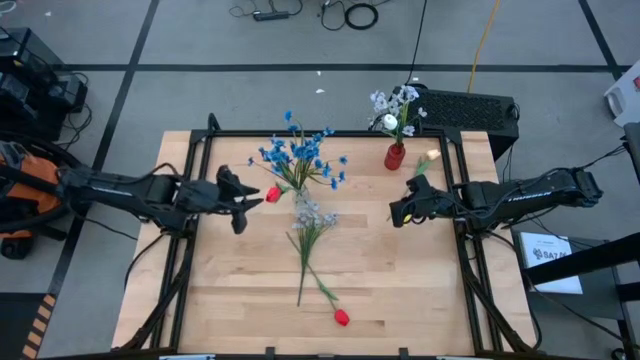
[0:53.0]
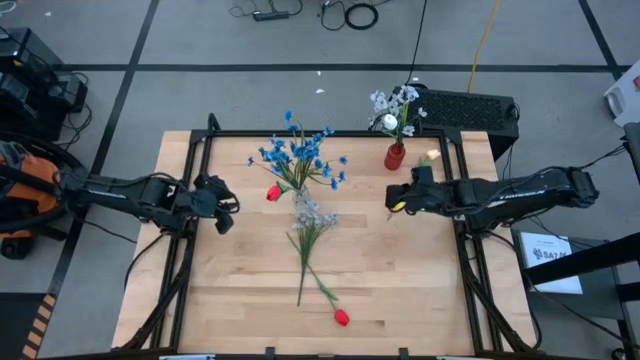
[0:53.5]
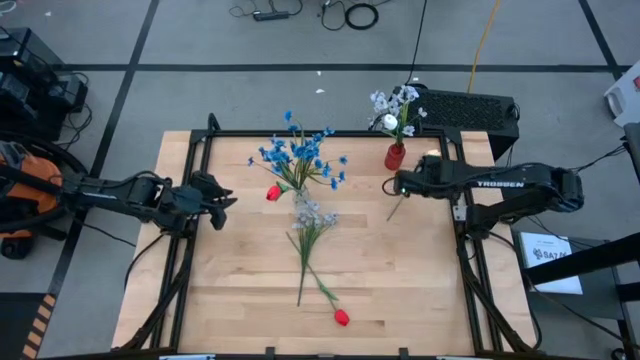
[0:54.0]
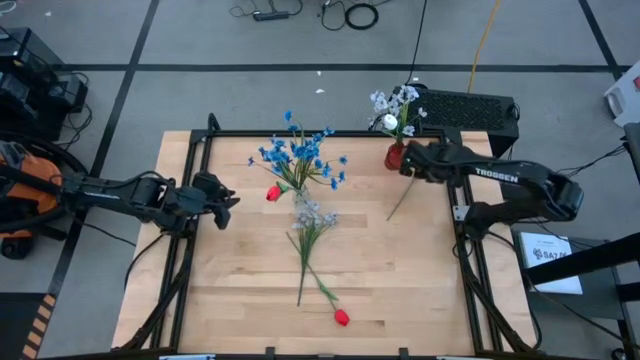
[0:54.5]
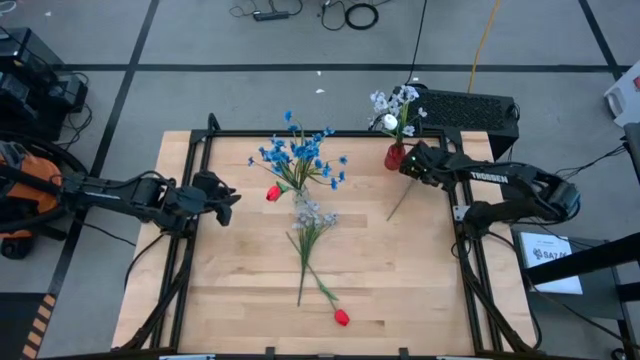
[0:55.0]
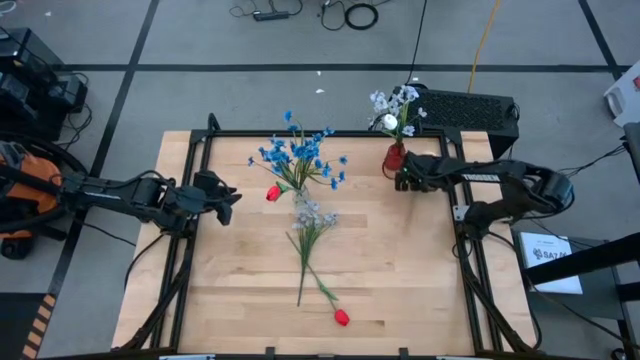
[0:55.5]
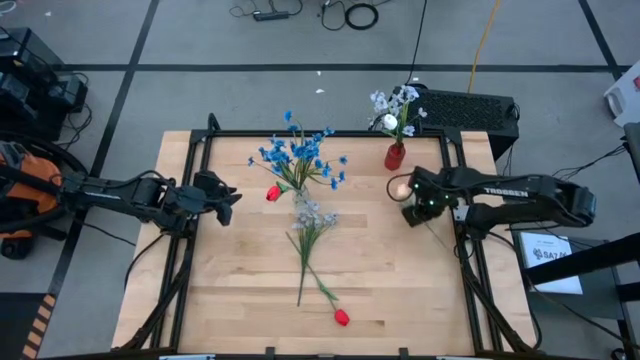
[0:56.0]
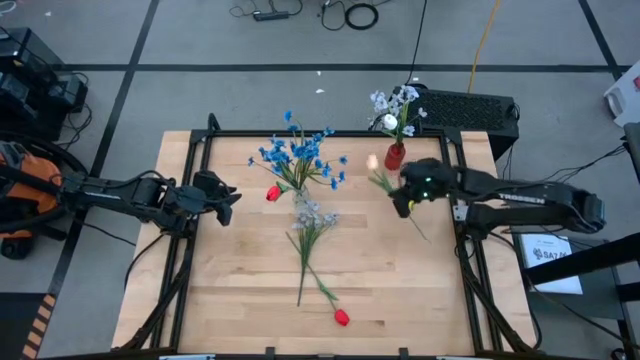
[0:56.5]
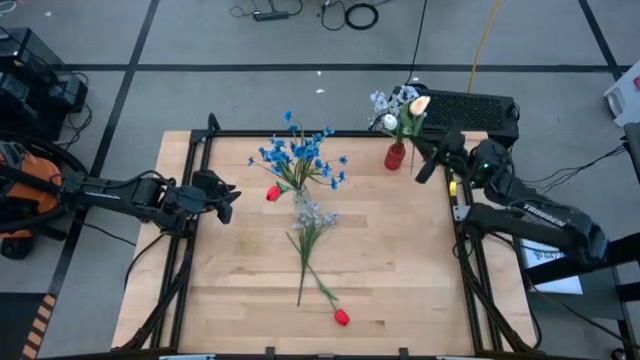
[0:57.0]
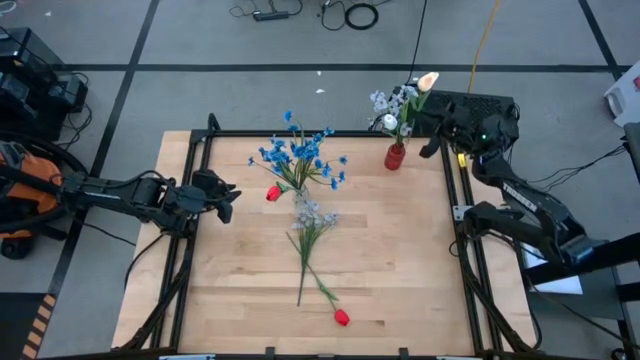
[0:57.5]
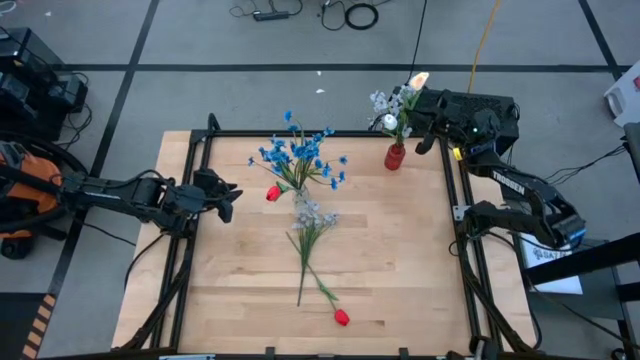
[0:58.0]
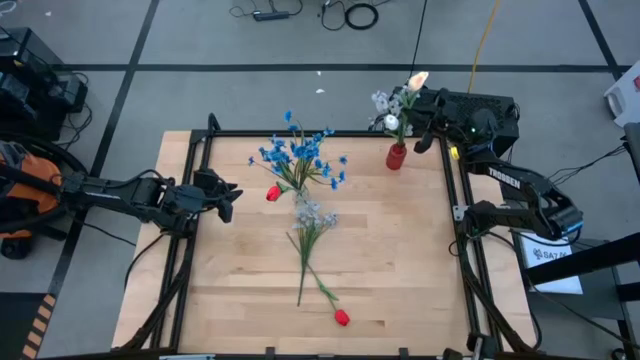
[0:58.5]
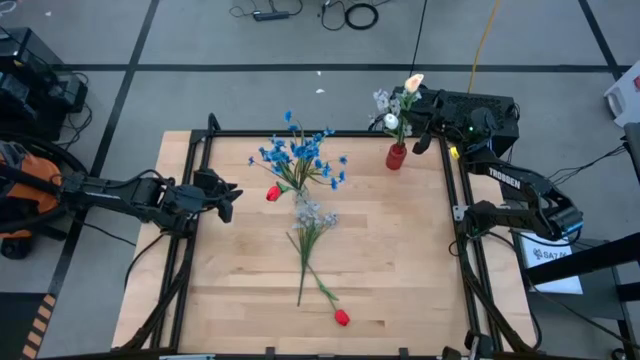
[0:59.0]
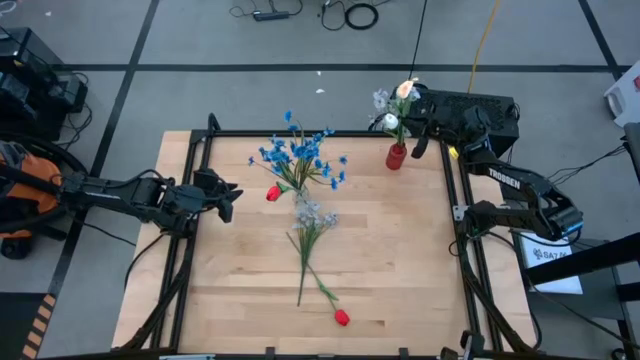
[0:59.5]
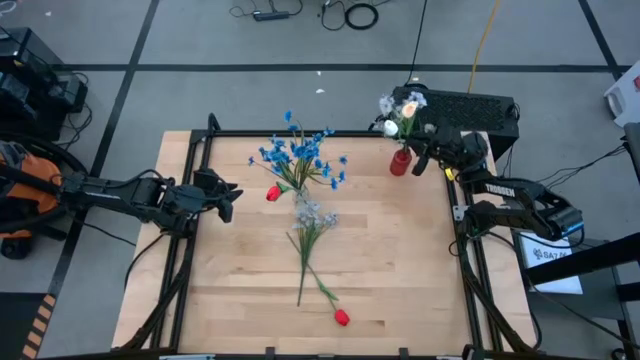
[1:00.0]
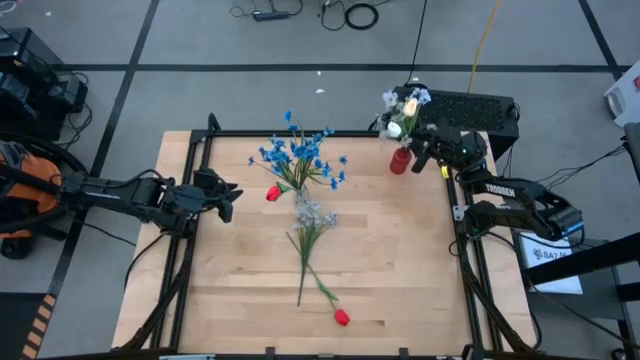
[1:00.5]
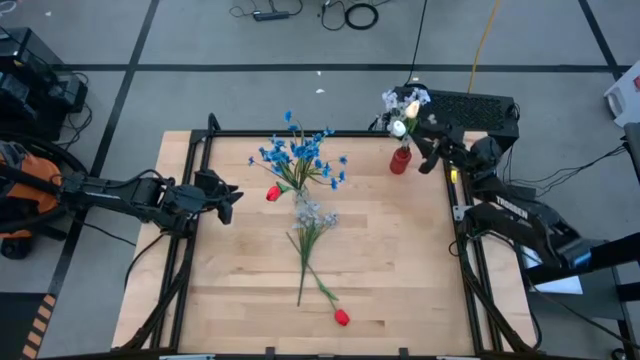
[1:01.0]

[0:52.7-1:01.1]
Task: Sort flowers into vase by color
Put the light yellow flower into the red vase

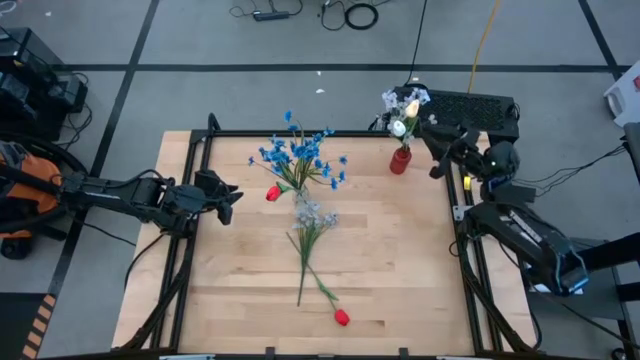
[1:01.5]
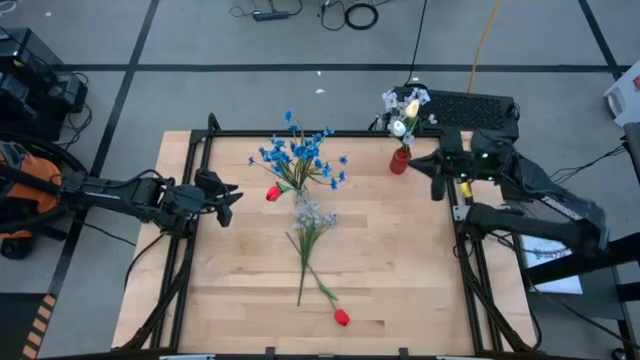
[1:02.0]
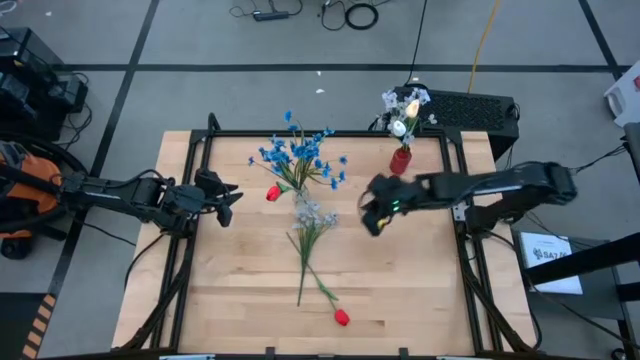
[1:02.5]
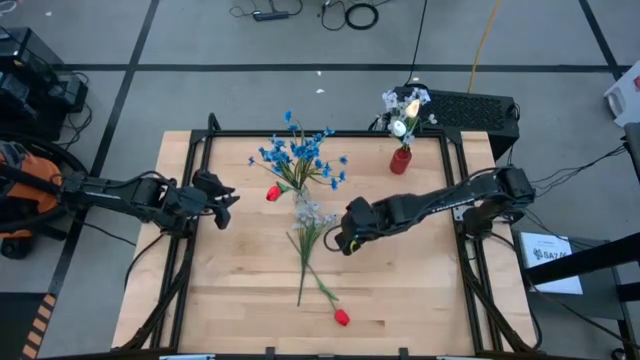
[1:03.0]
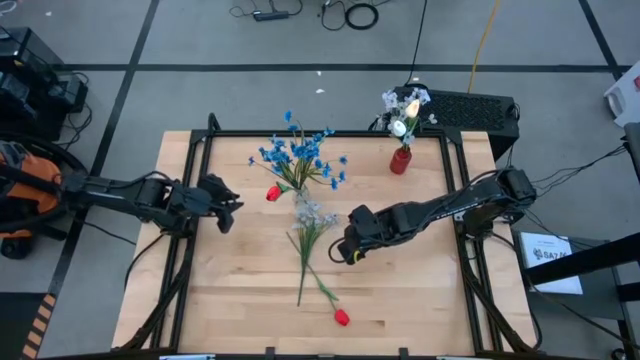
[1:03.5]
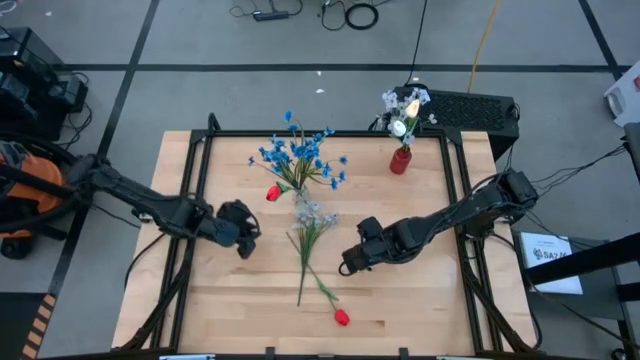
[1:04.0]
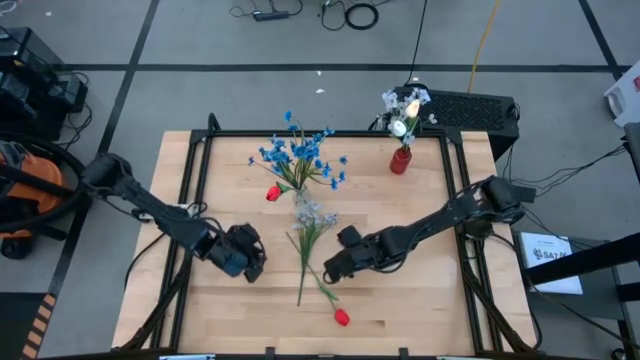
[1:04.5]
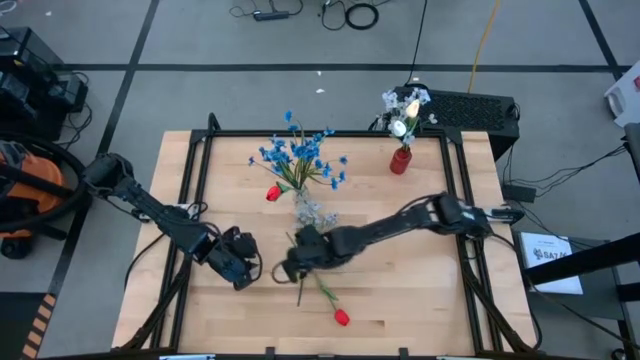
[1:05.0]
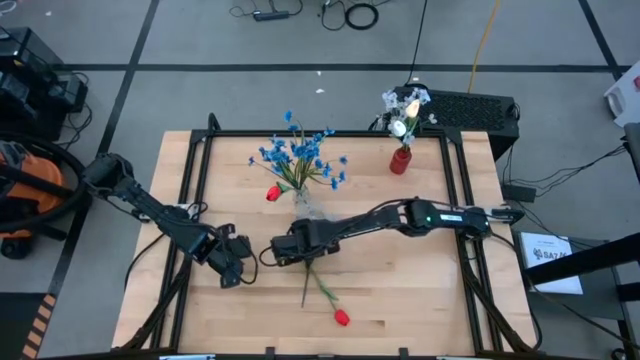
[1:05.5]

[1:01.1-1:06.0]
Put the white flowers into the red vase

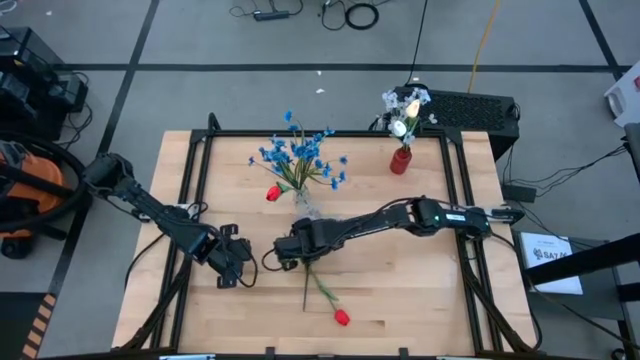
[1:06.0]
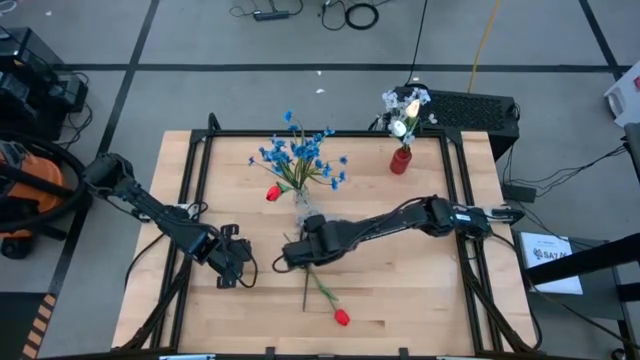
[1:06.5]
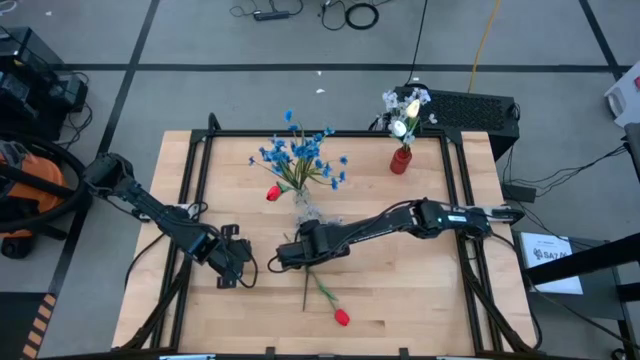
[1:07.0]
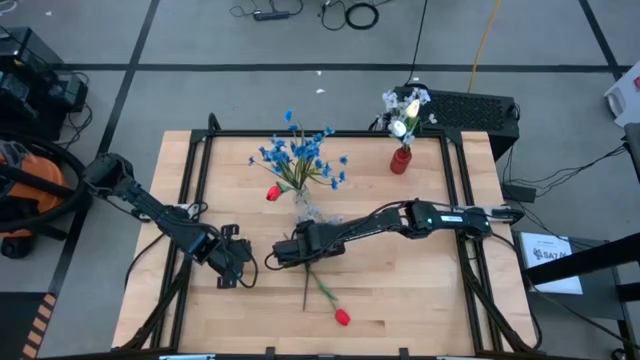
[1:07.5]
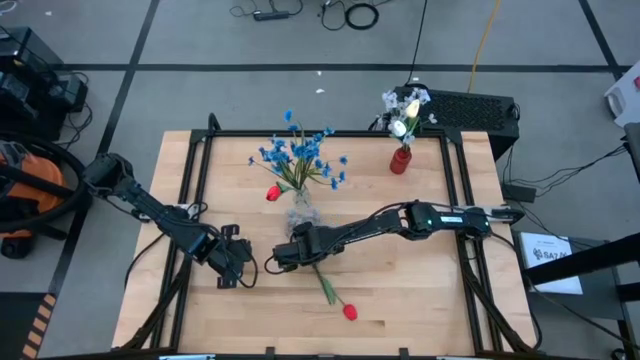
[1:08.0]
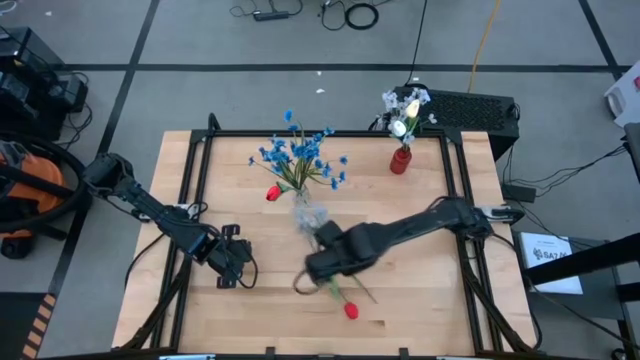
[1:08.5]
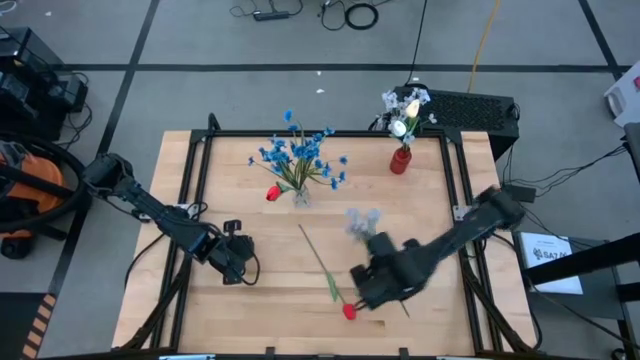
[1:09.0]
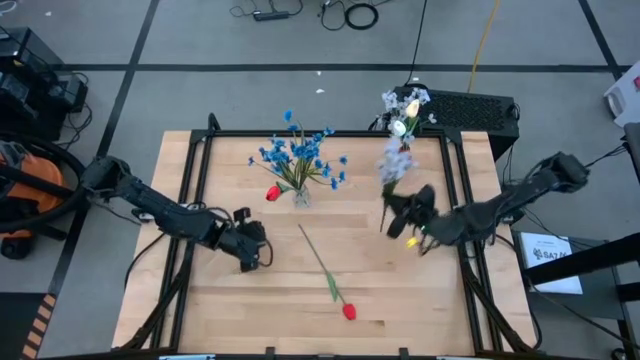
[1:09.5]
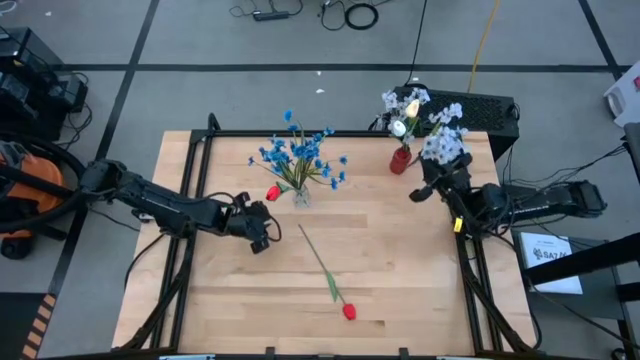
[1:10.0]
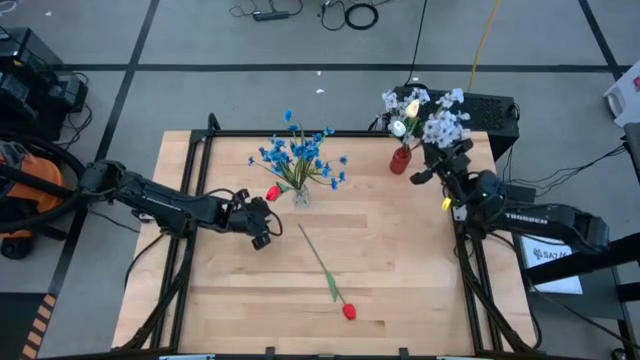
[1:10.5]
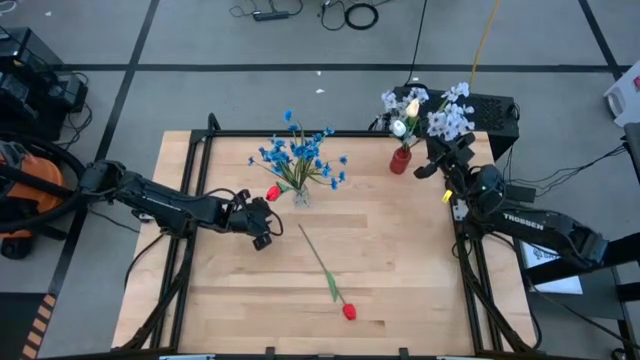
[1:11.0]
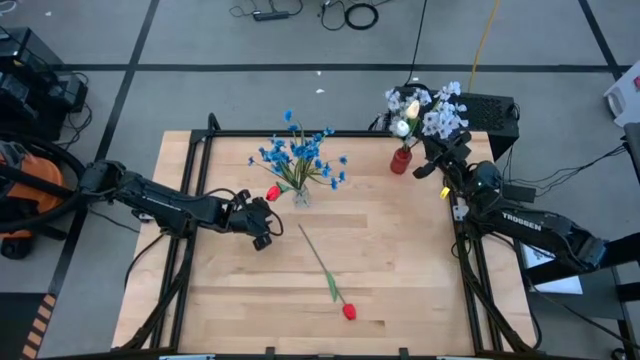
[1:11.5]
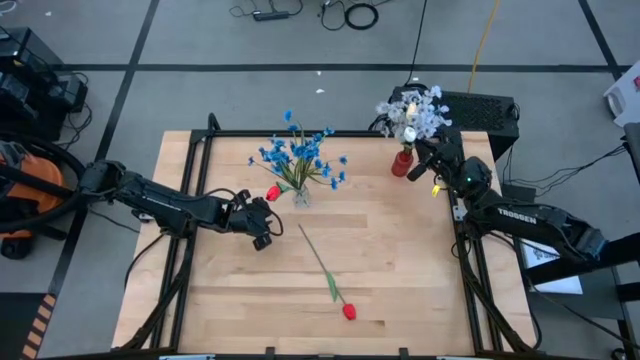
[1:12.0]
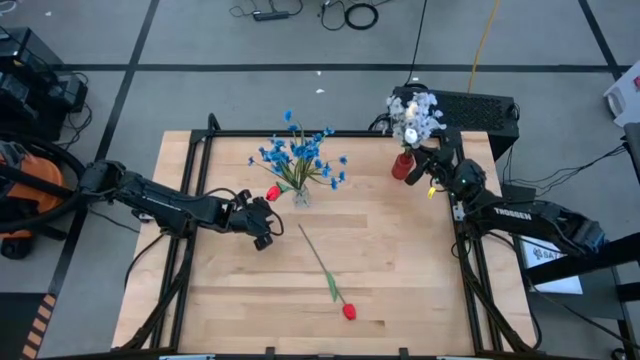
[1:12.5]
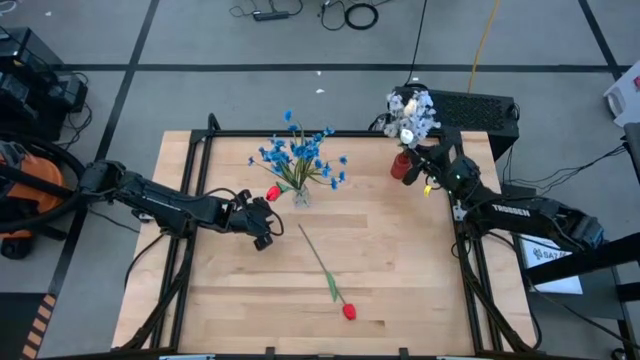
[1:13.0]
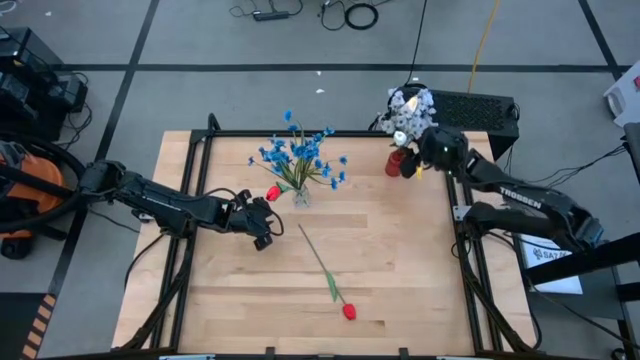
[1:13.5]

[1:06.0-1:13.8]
Put the white flowers into the red vase

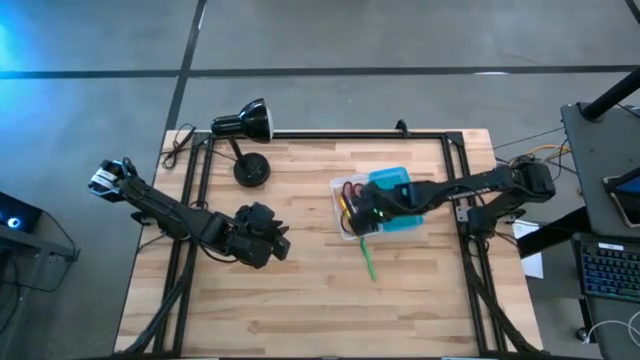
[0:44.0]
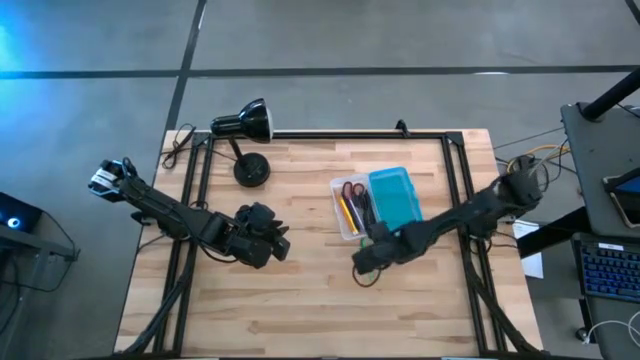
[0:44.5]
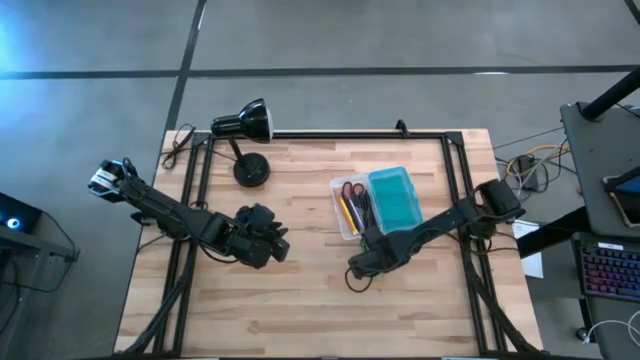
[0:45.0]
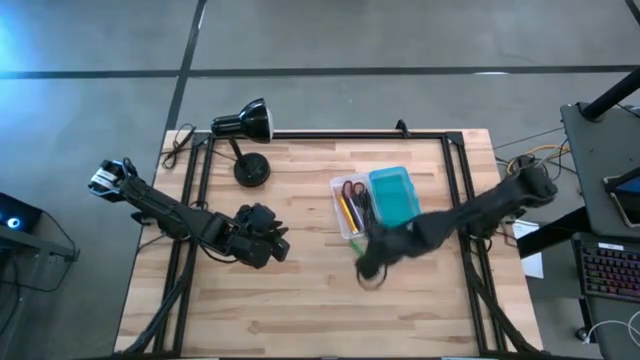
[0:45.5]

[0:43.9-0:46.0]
Task: Pick & place school supplies into a supply box
Put the green pen into the blue supply box
